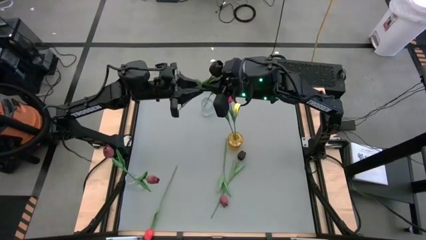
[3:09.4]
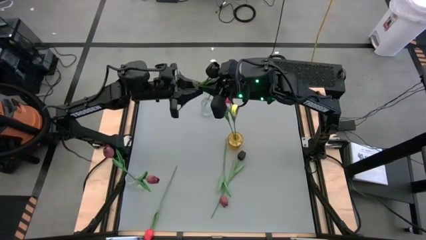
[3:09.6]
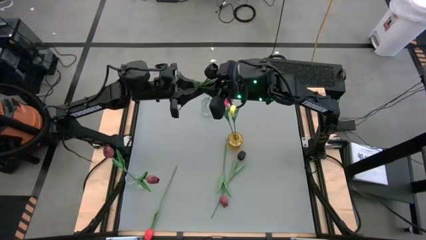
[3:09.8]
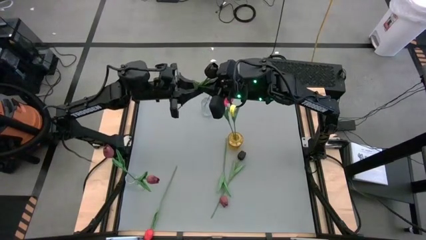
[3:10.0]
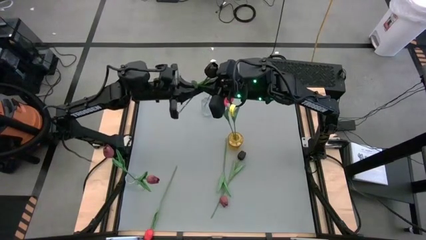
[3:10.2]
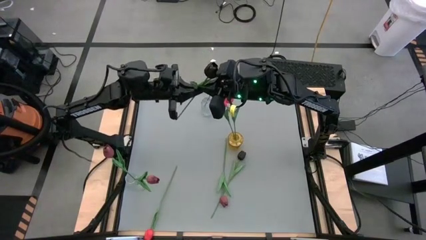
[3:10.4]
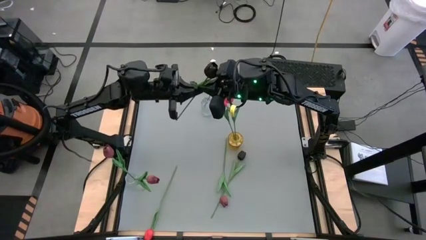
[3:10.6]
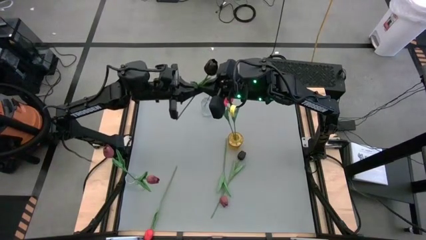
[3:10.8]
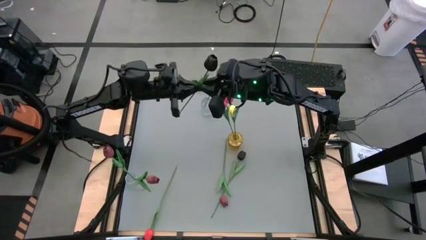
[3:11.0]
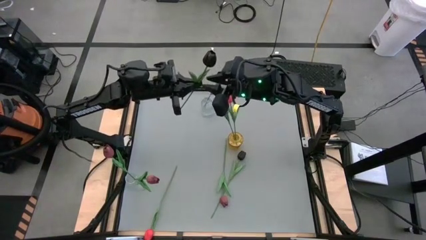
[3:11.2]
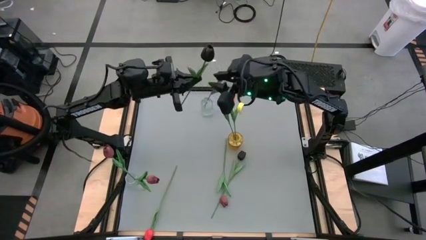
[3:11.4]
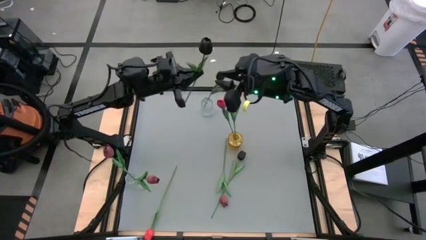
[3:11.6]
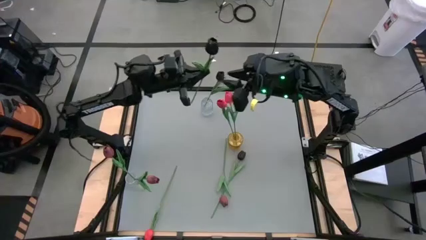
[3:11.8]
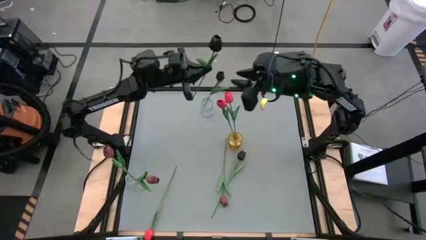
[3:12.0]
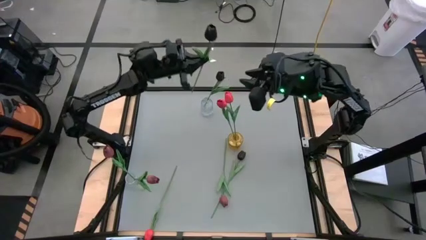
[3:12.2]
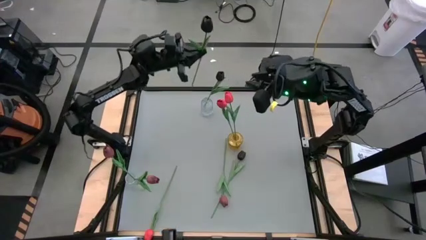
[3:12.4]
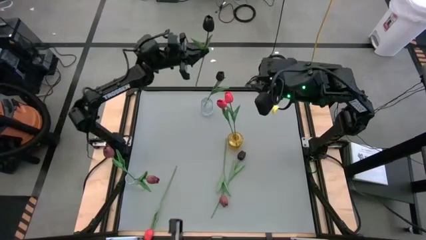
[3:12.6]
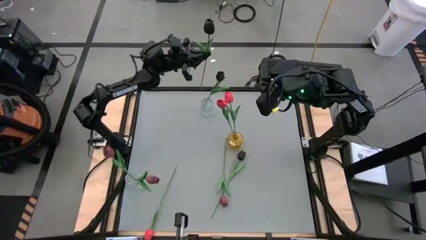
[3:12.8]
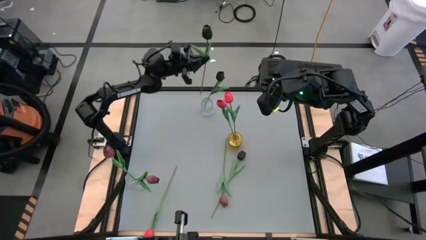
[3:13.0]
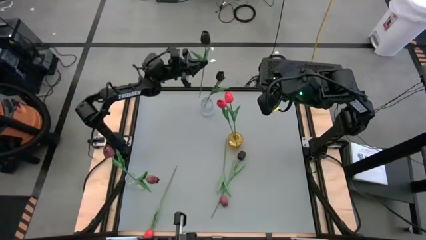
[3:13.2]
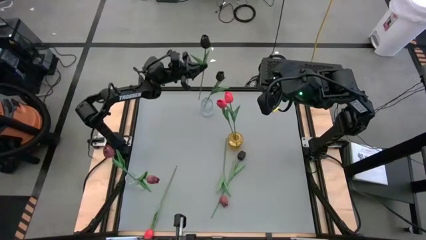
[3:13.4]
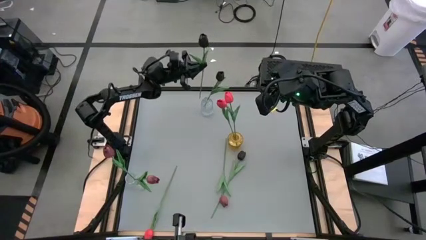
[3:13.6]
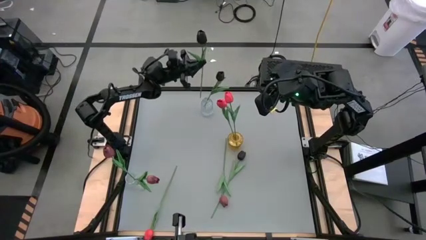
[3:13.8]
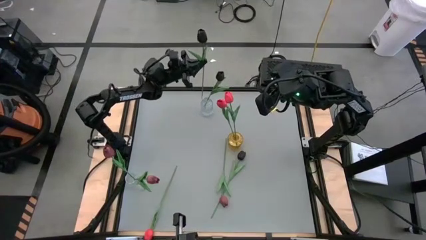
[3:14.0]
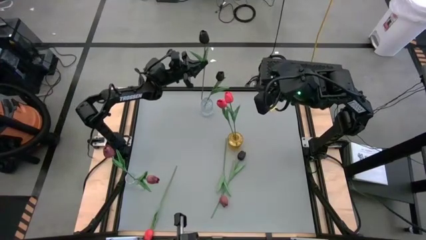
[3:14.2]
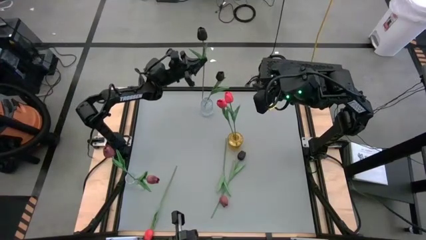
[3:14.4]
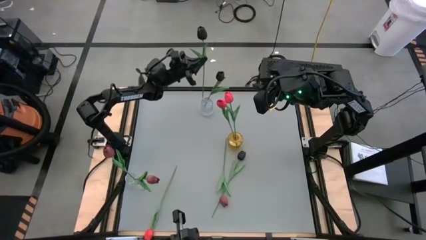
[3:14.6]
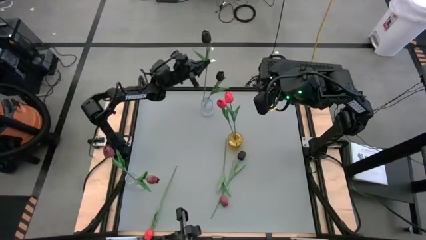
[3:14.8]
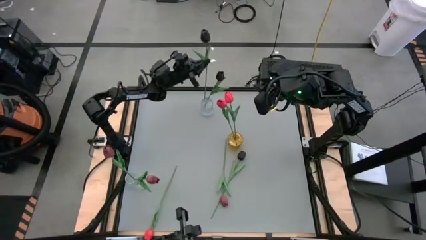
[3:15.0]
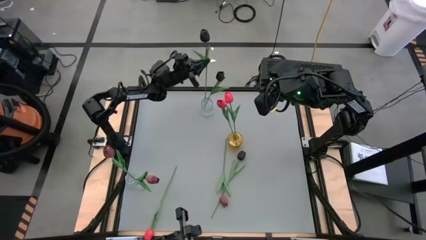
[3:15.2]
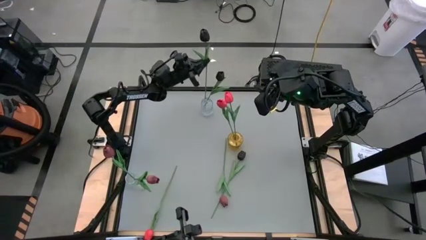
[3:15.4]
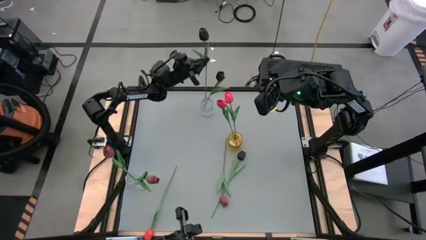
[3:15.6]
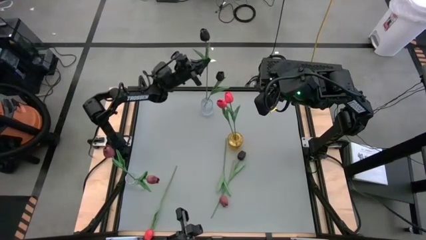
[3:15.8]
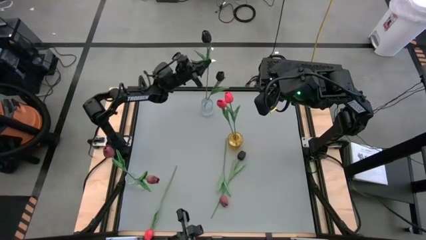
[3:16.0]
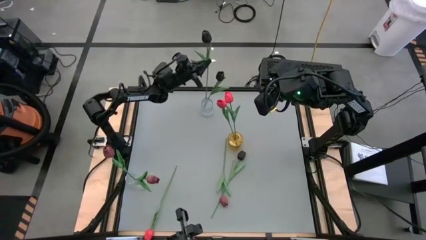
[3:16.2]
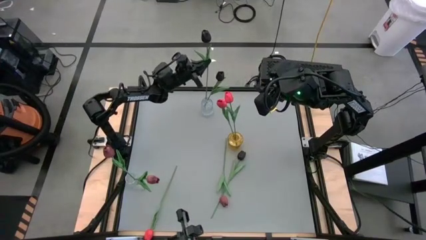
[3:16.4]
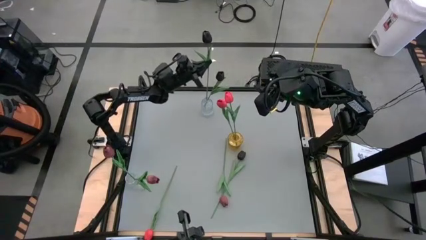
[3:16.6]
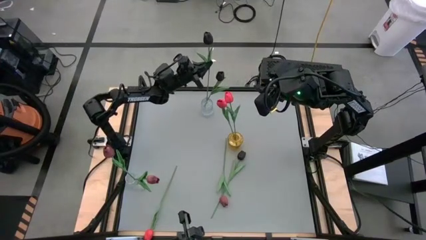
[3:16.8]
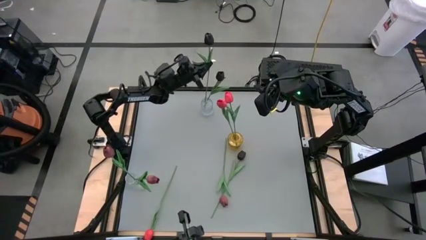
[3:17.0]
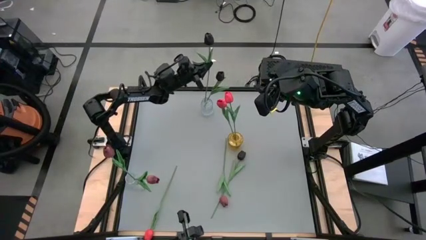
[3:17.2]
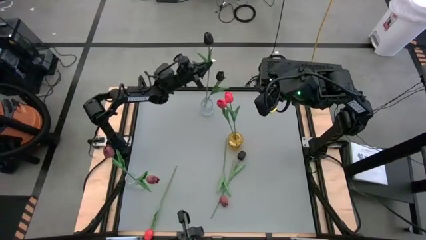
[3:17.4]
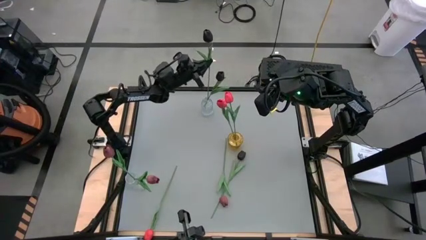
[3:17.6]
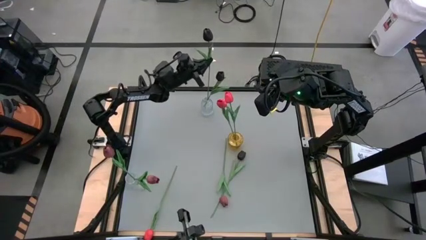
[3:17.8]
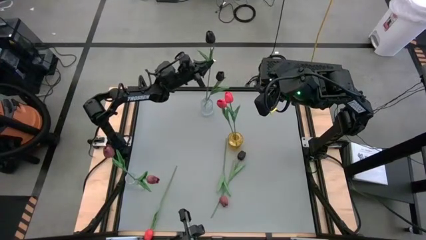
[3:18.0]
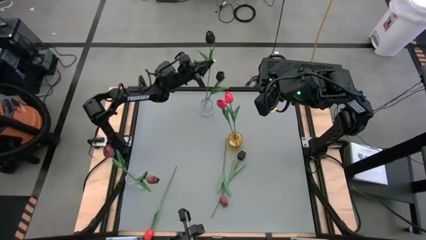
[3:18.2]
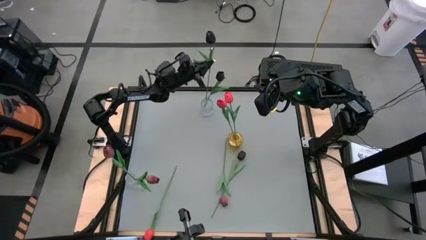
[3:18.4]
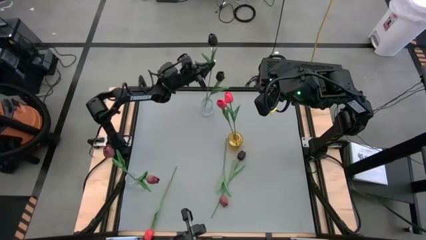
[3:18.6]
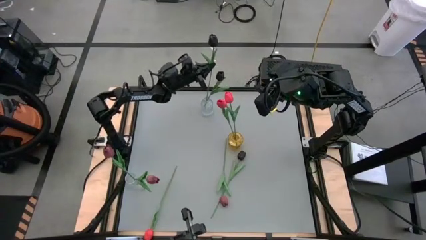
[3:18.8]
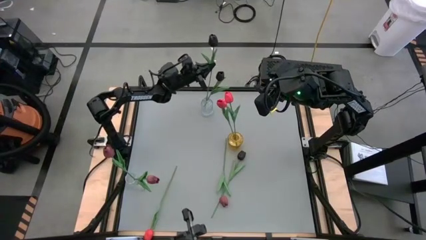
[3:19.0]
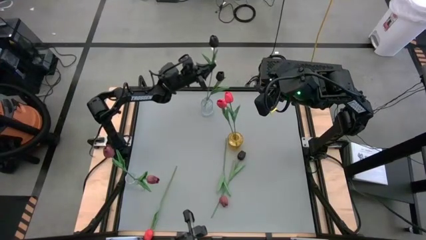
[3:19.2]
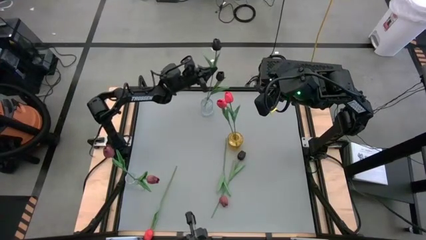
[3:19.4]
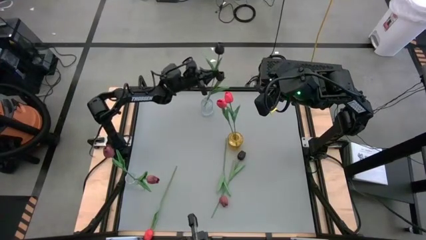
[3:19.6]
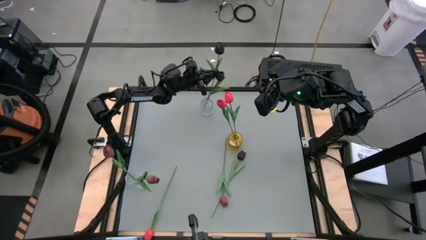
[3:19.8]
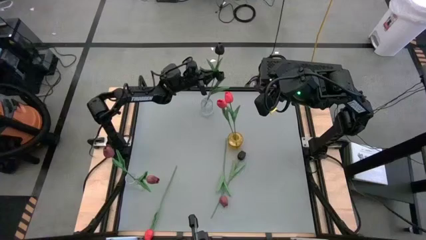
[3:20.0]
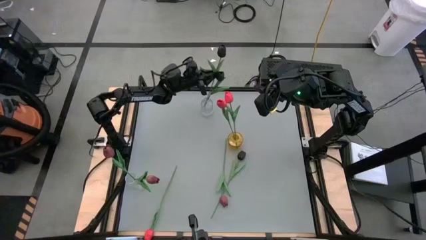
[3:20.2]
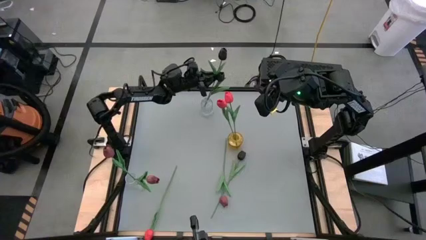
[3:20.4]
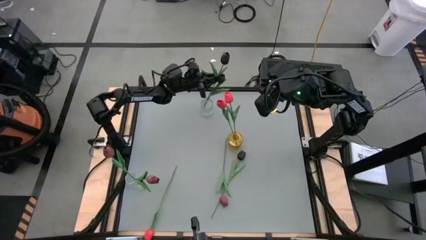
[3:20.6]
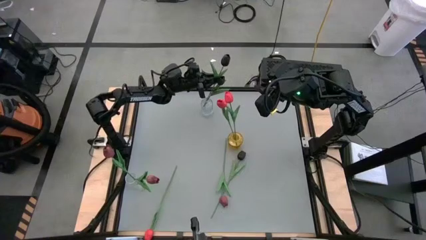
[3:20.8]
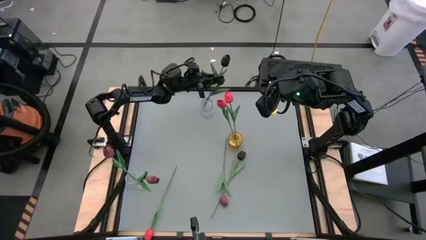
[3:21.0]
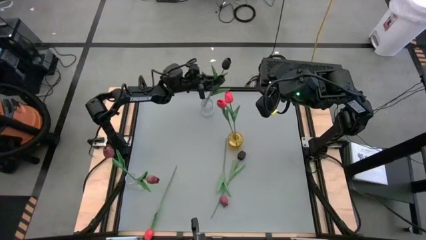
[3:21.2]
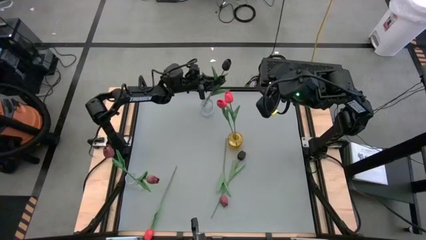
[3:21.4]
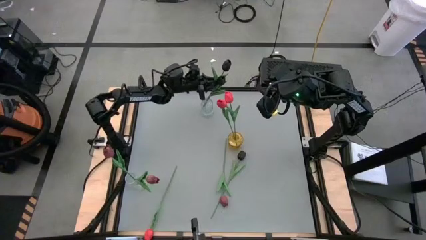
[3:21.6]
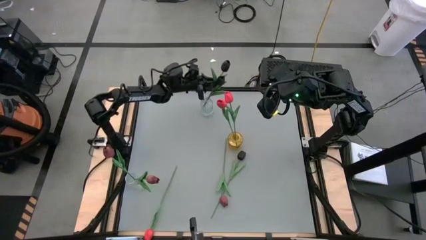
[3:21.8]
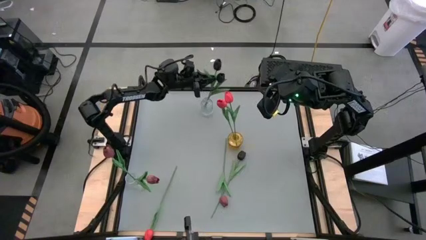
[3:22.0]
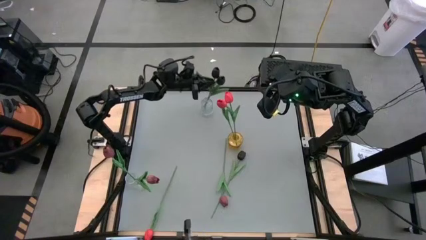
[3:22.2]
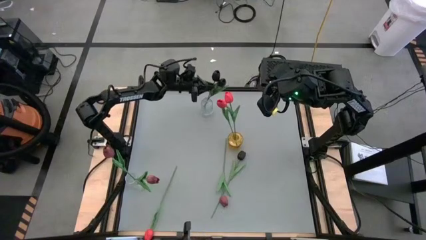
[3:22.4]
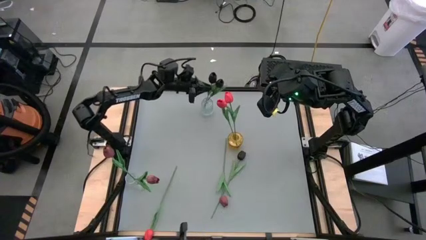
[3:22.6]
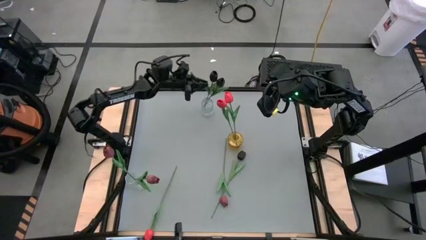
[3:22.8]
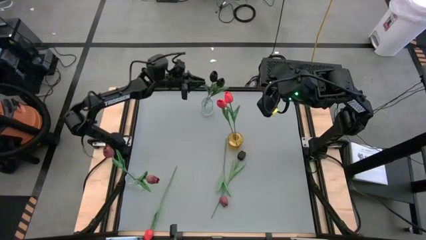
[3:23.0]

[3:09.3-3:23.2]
Task: Sort flowers into vase by color
Put the right black tulip into the top transparent vase

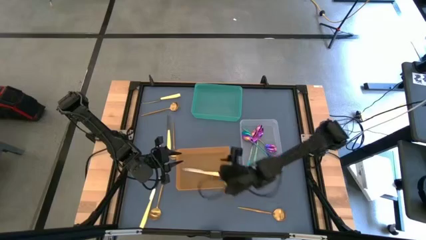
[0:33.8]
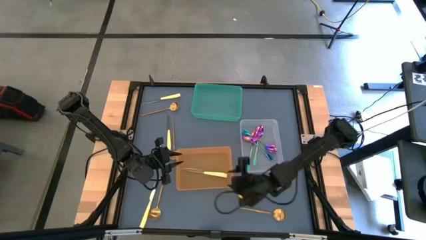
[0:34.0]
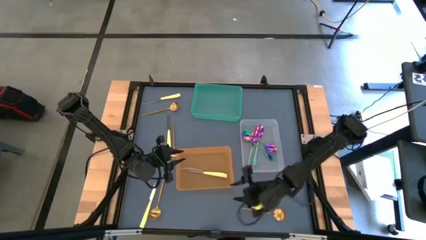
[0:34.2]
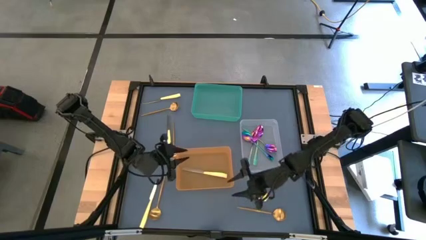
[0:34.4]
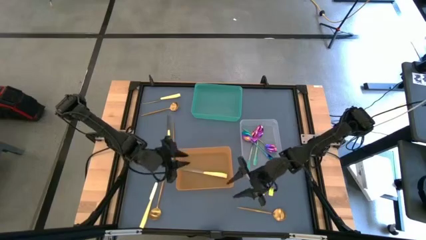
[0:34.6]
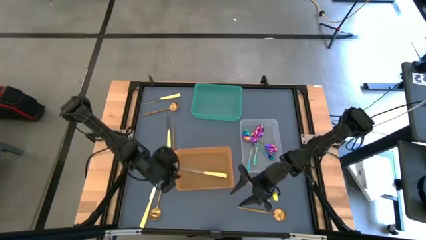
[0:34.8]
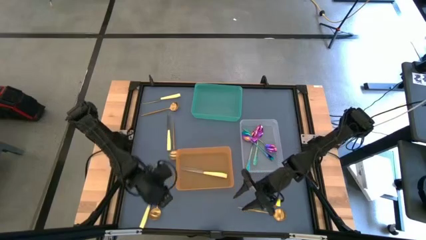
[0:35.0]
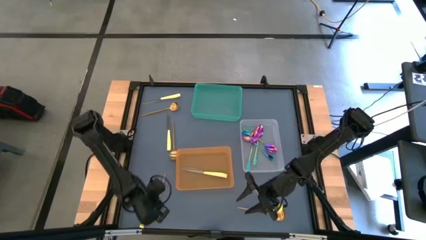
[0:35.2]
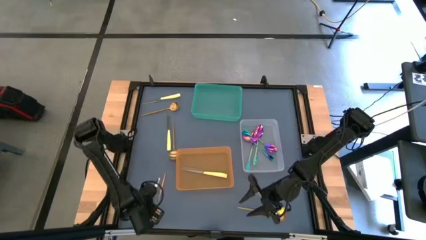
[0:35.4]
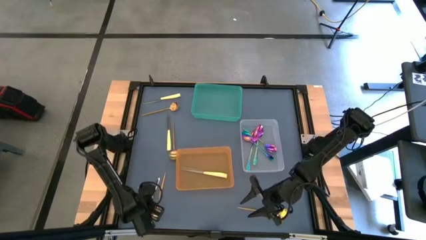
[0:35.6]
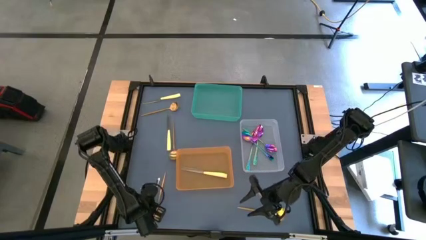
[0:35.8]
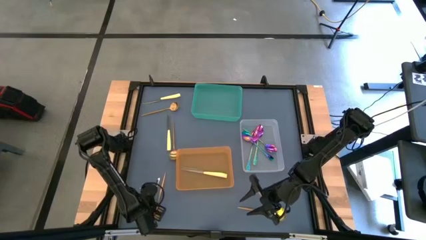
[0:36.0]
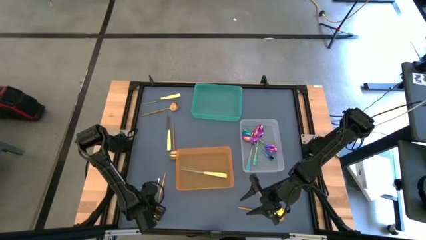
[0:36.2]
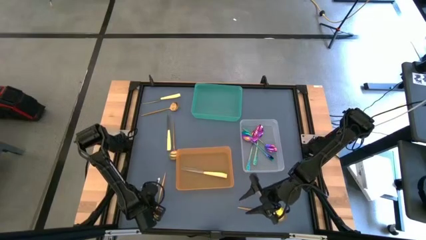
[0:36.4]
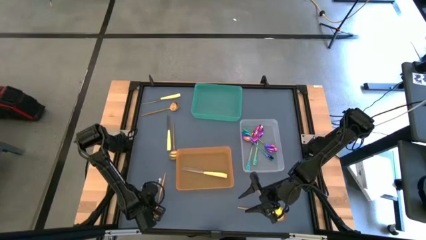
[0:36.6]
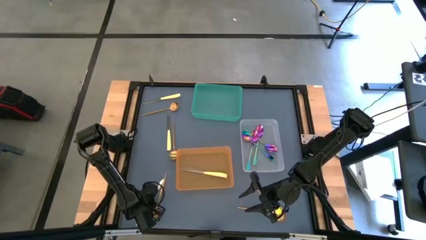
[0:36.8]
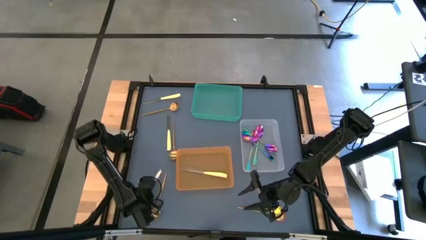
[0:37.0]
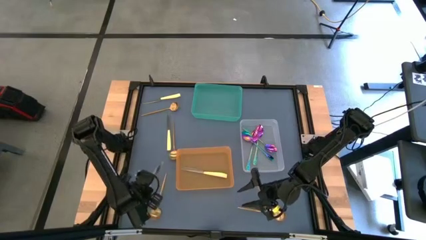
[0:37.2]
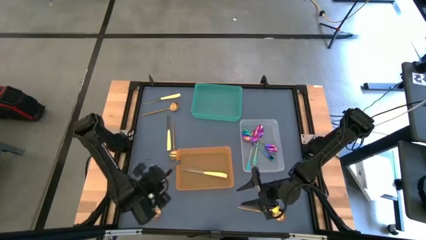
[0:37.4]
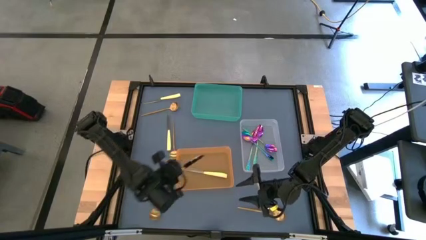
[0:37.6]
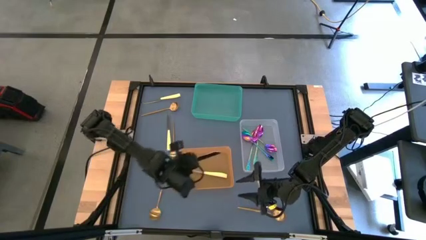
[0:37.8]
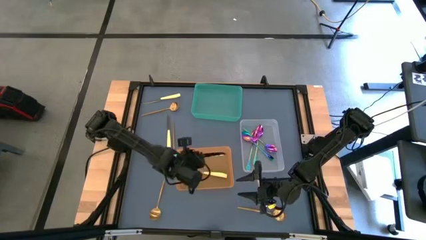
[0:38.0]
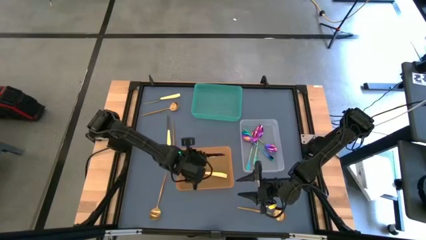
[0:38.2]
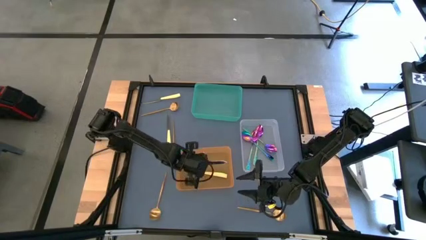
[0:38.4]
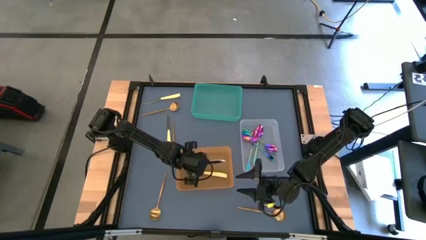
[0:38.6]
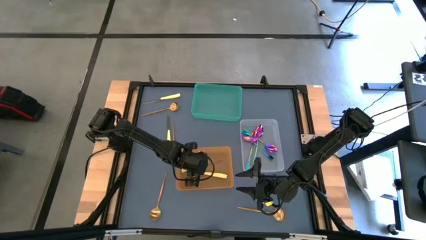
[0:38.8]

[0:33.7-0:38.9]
Task: Sort silverware by color (type)
Put the yellow table knife into the orange bin
